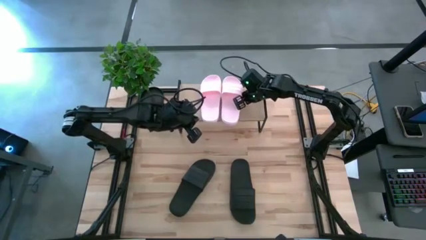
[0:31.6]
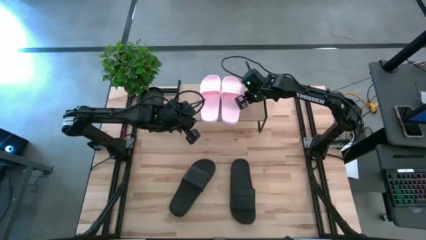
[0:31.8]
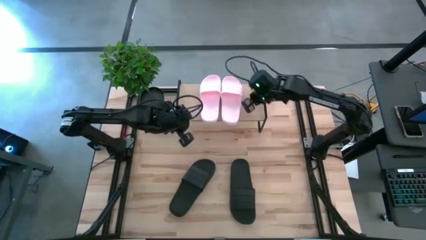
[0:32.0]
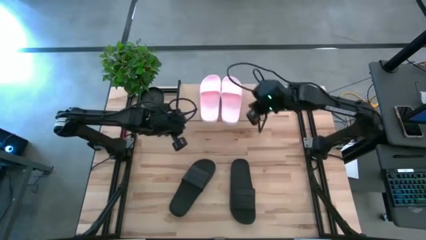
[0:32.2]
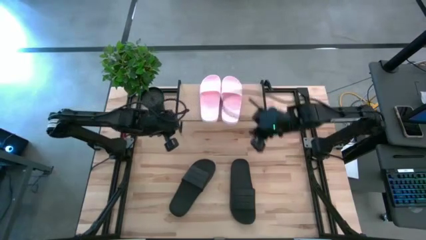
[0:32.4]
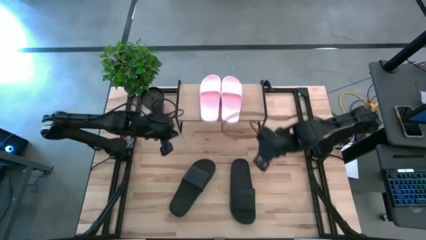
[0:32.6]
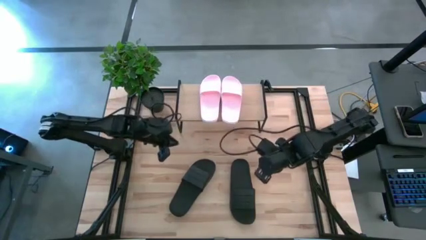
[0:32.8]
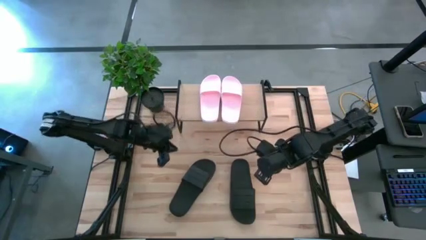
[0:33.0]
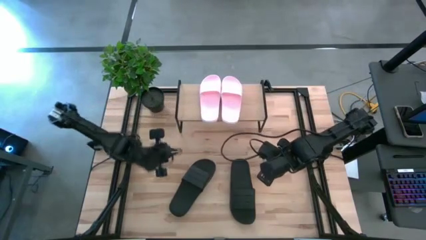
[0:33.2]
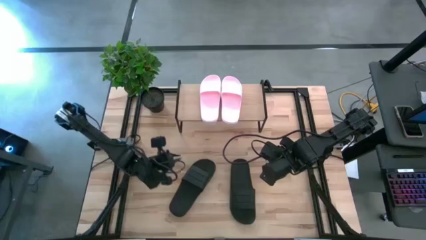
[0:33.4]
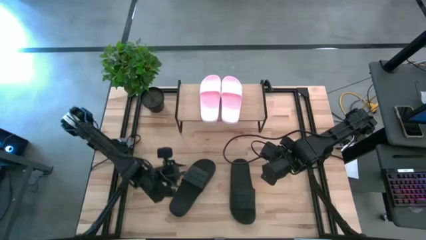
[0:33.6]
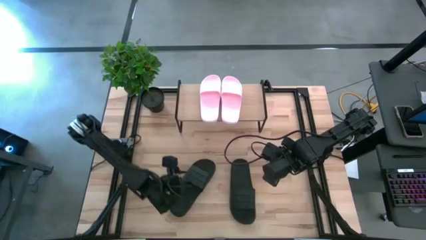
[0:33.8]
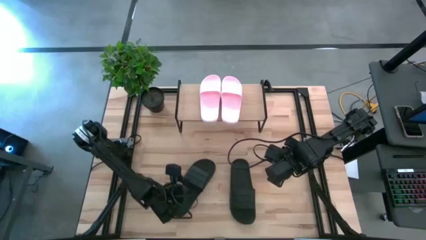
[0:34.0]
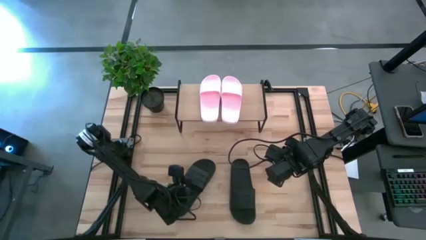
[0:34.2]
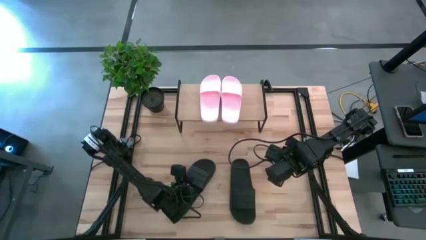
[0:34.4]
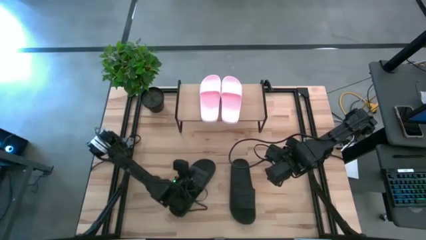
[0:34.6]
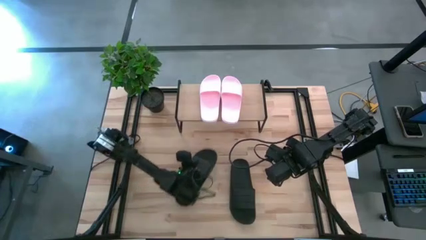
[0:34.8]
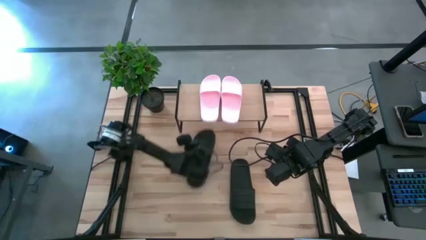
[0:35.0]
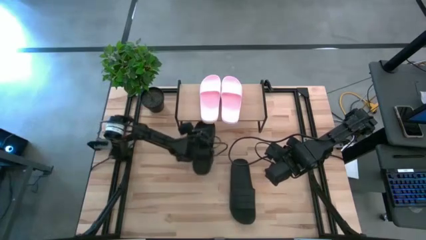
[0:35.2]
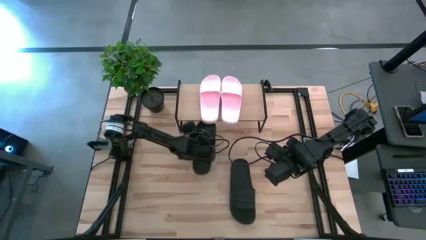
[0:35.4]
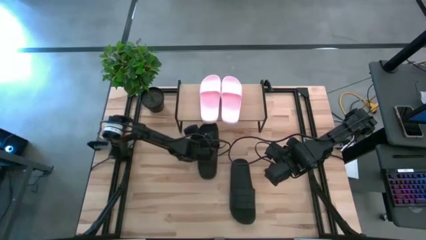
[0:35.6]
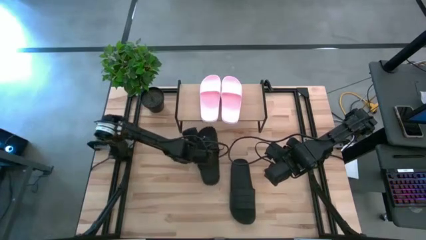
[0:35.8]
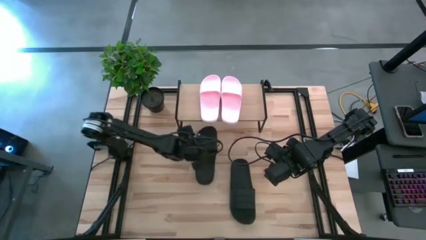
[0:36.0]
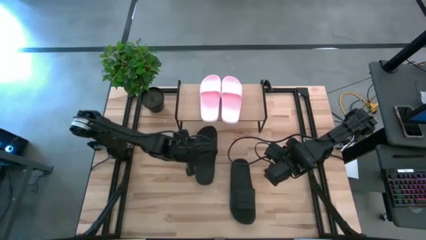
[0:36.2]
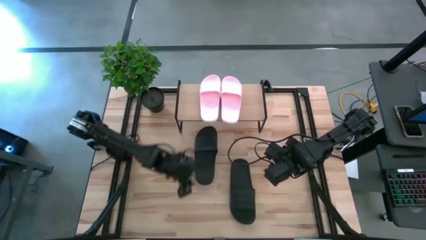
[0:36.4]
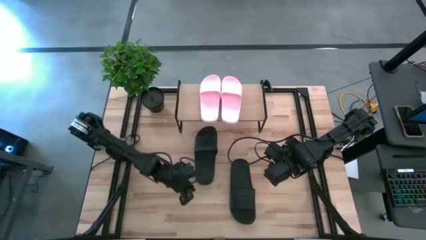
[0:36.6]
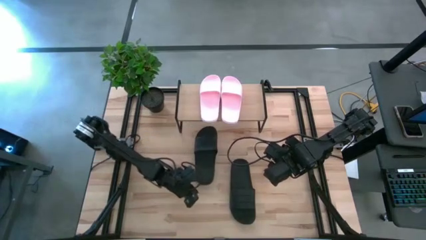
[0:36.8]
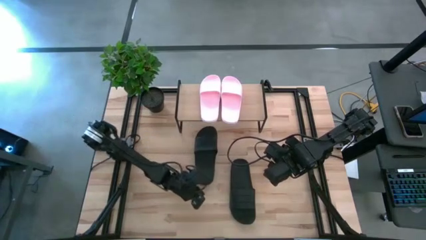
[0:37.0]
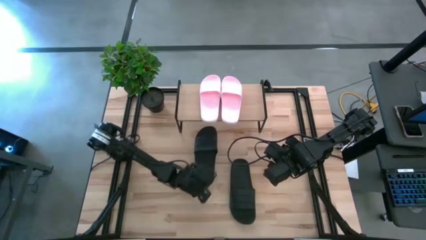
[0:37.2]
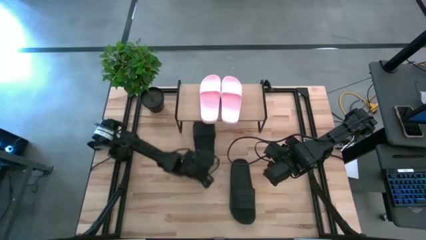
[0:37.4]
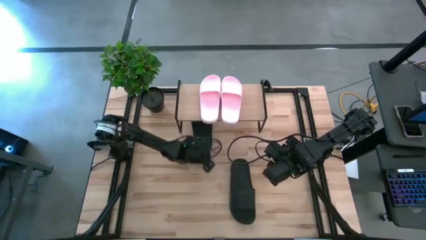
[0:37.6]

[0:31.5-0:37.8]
Task: Pick and place slides into the shelf
Put the left black slipper under the shelf

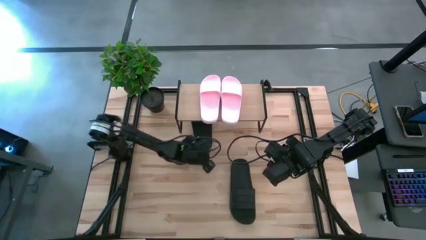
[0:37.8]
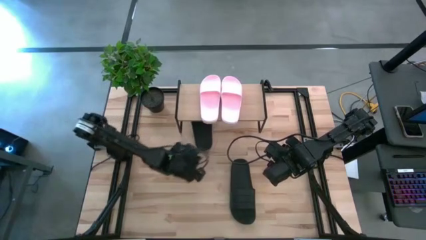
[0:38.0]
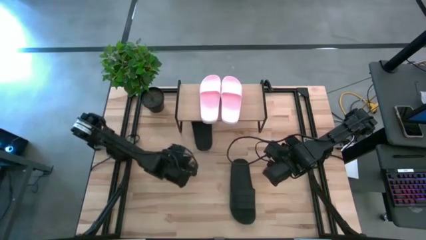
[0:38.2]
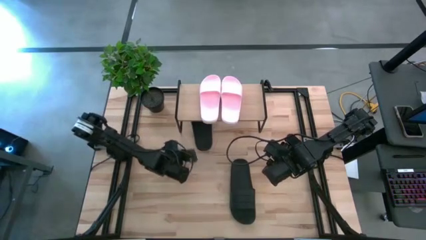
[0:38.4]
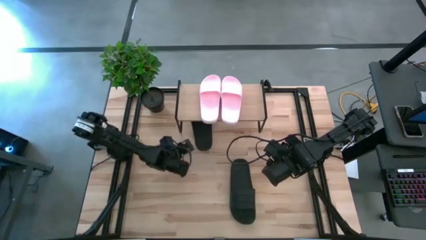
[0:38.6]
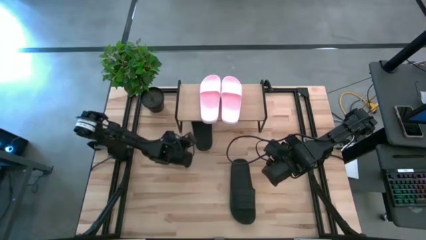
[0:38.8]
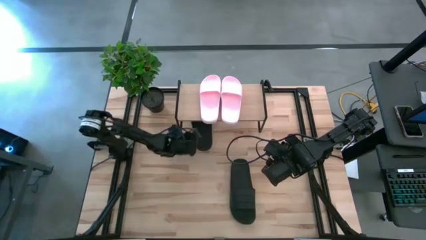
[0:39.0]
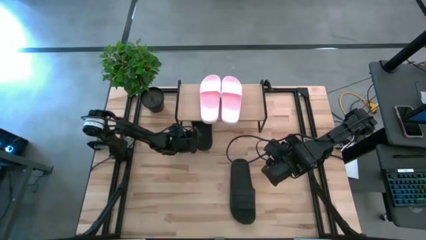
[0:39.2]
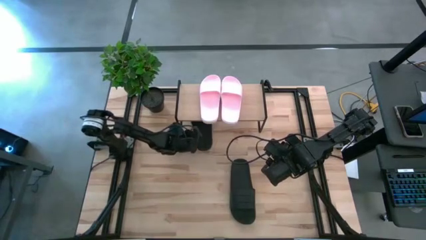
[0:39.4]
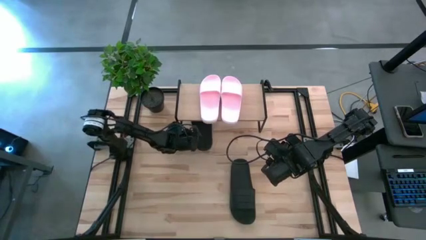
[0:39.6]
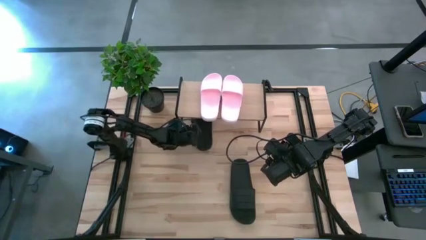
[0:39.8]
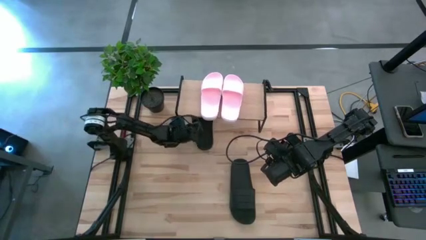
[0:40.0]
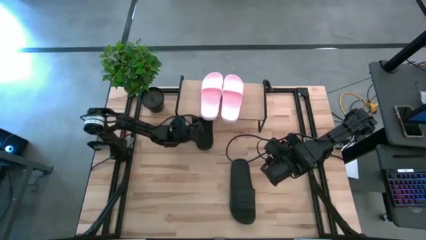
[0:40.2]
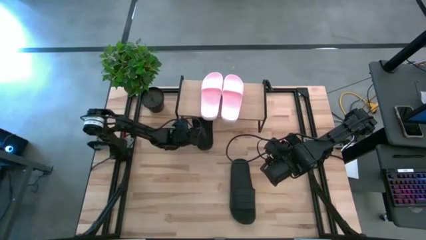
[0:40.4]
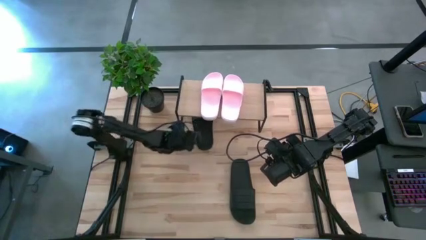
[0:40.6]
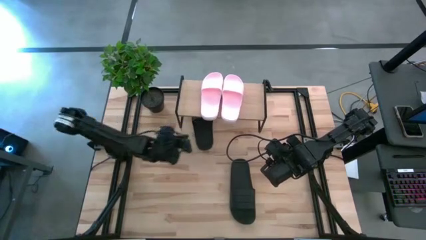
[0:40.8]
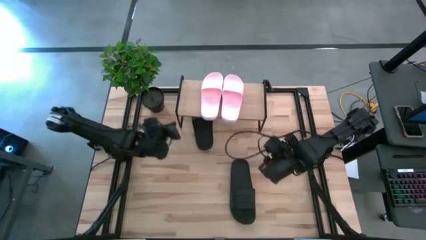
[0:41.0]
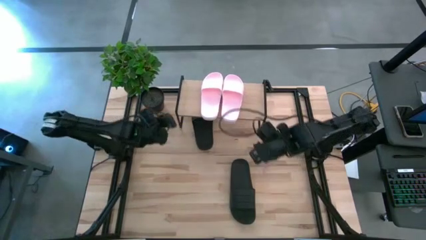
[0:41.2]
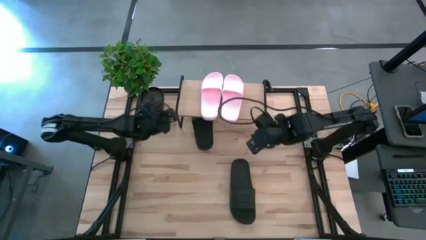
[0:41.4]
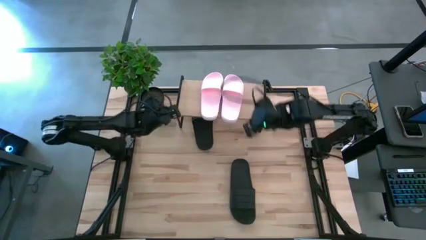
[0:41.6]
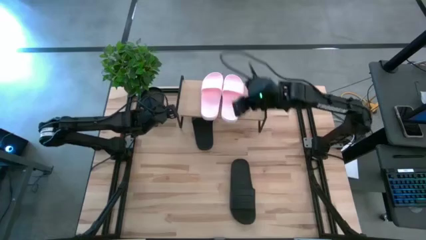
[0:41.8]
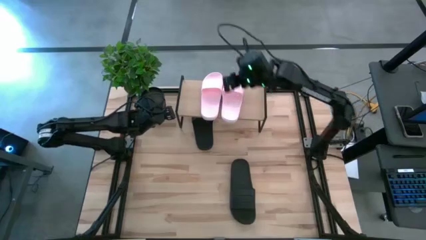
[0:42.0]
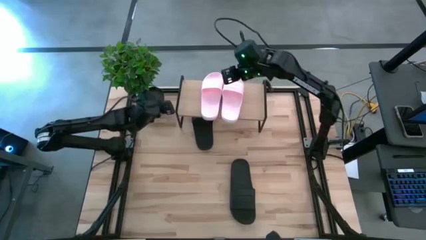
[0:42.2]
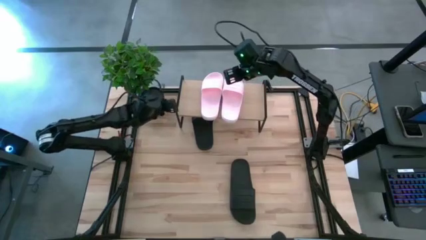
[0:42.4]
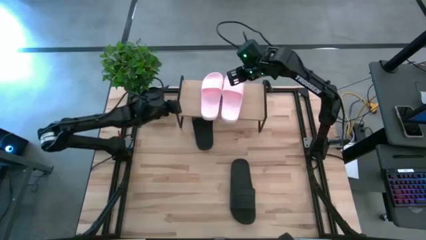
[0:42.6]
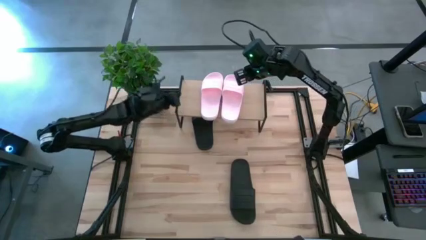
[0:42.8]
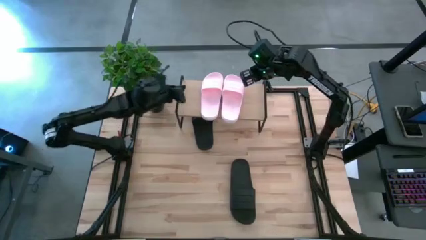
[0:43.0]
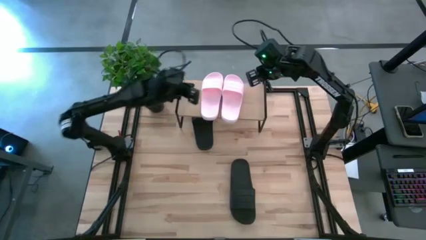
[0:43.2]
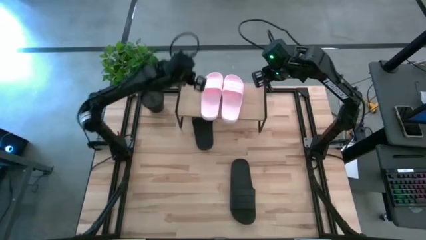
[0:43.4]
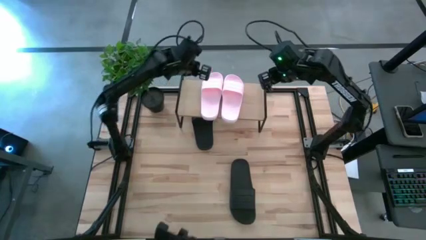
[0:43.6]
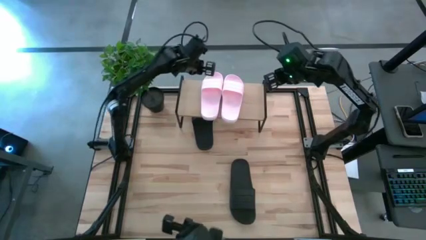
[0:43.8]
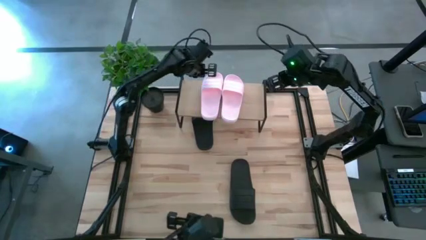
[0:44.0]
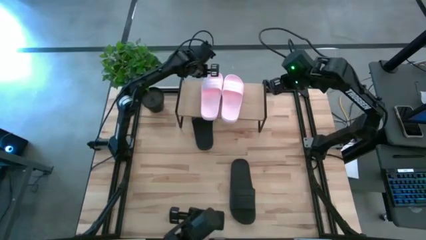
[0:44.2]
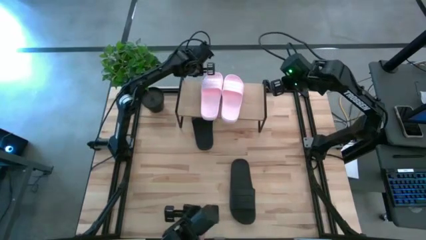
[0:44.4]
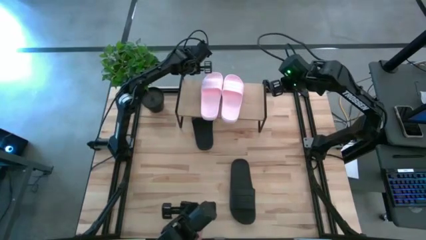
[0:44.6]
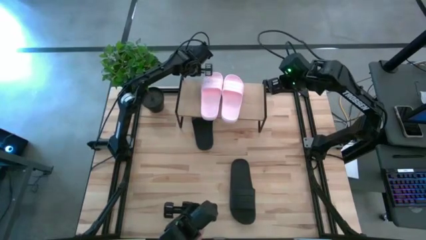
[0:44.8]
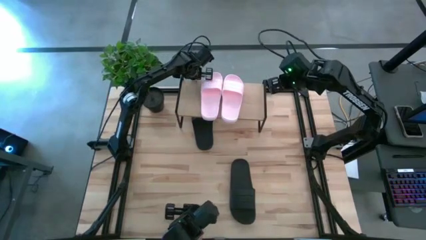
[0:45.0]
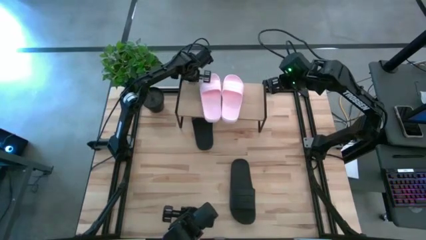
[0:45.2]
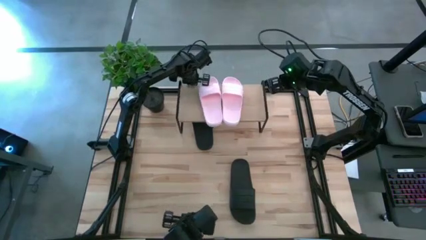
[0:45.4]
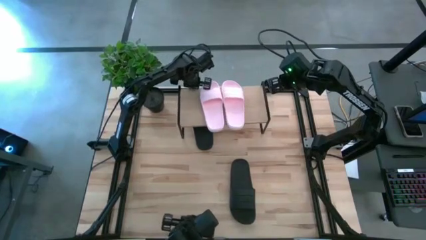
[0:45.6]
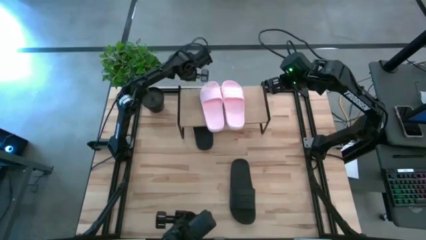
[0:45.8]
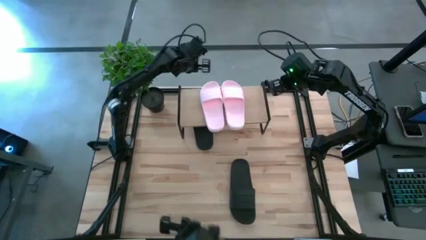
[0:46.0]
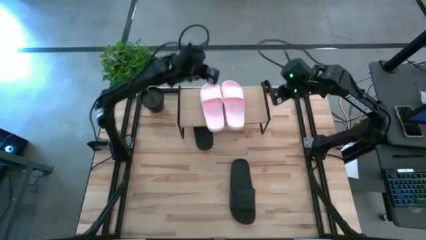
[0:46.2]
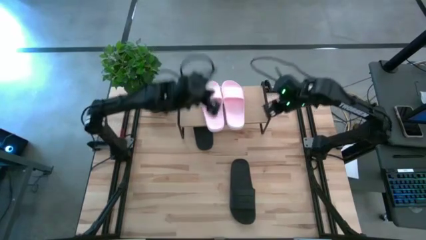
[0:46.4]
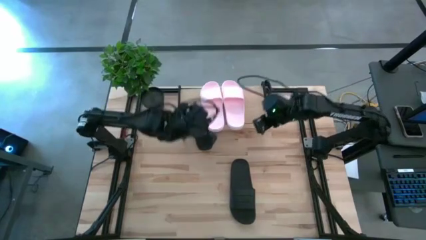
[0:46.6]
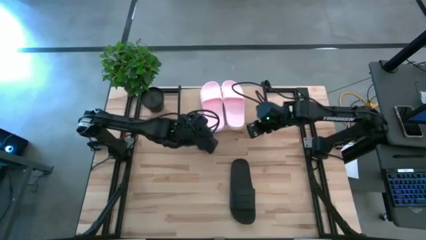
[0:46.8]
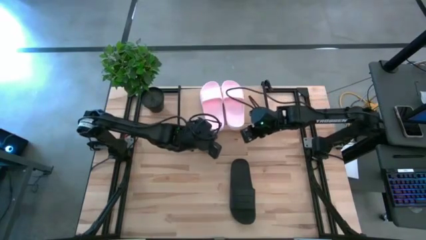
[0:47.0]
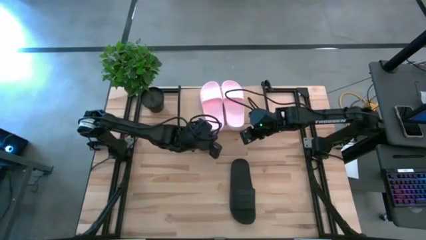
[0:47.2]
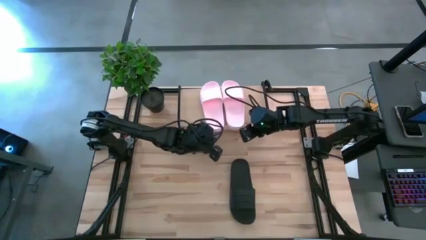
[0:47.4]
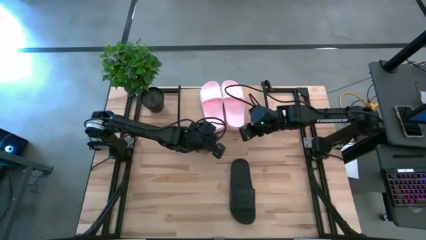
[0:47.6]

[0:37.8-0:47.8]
Adjust the shelf
